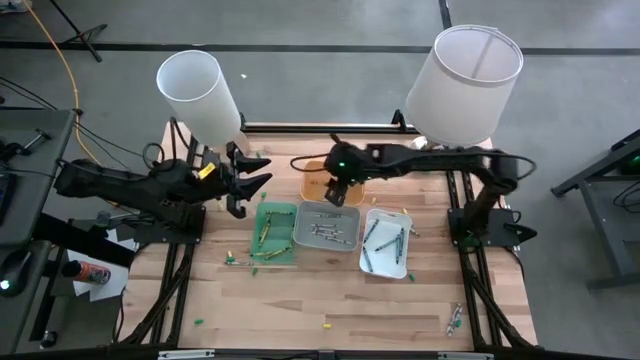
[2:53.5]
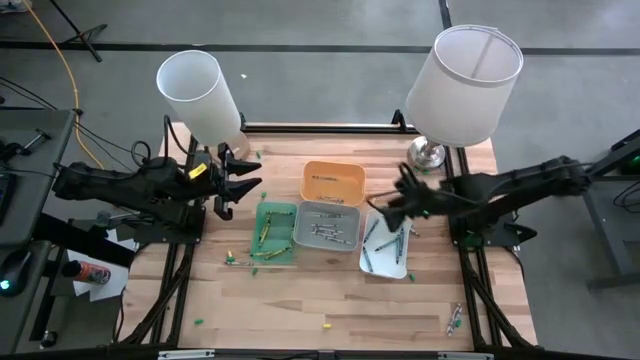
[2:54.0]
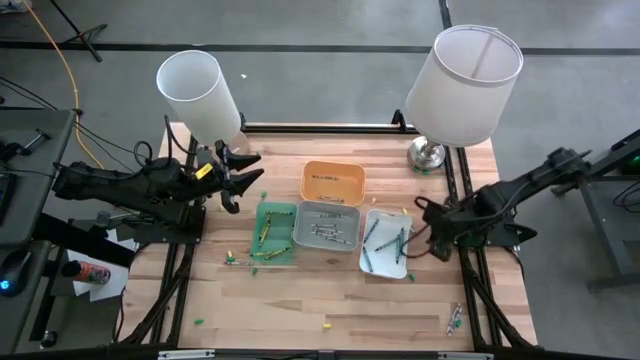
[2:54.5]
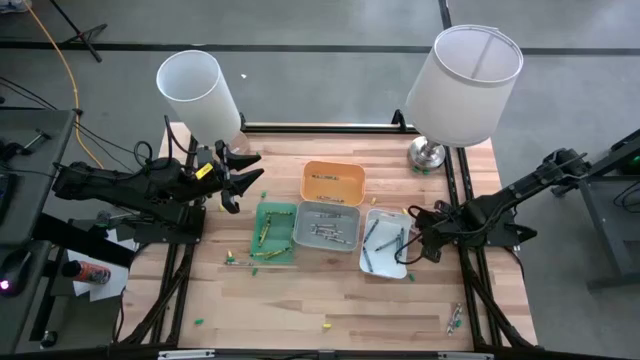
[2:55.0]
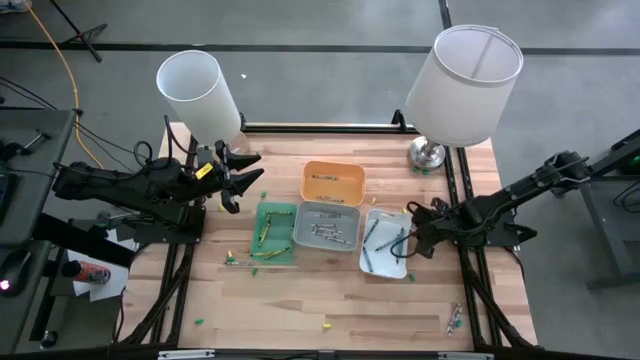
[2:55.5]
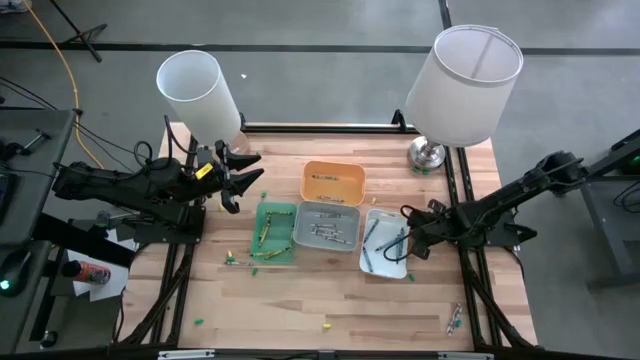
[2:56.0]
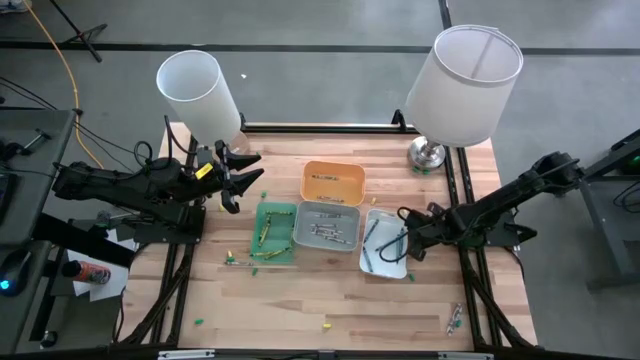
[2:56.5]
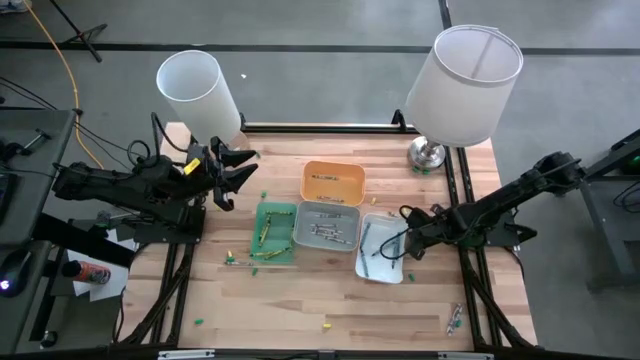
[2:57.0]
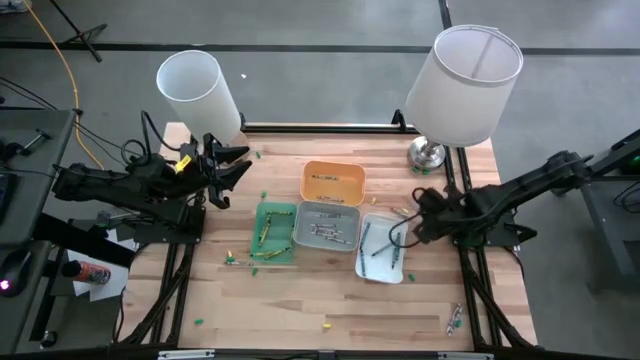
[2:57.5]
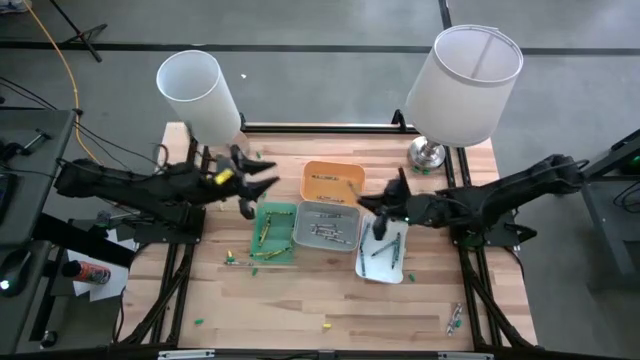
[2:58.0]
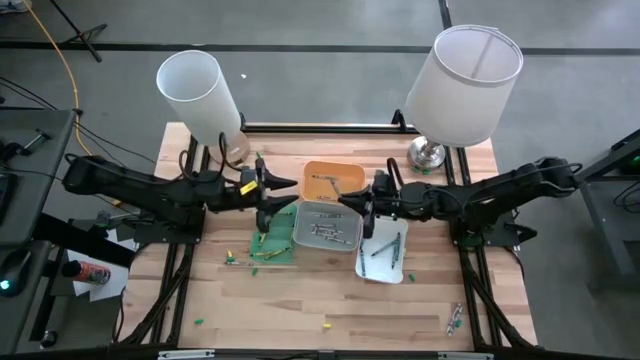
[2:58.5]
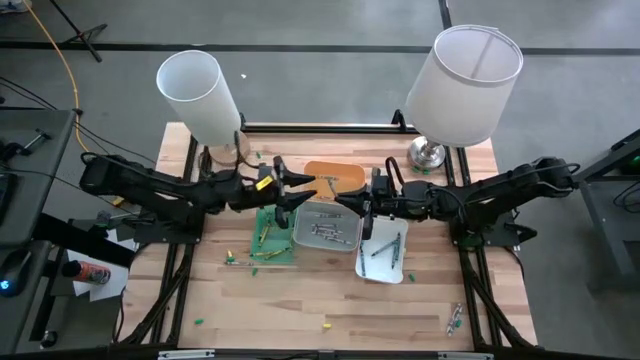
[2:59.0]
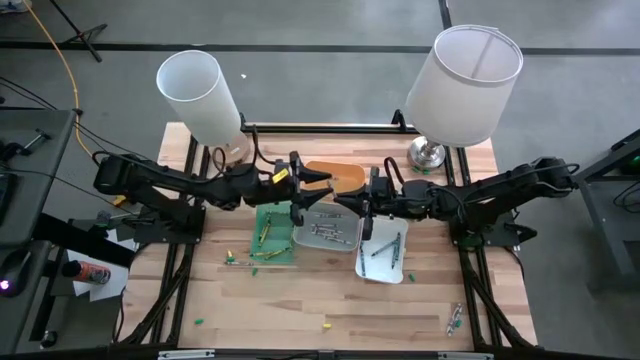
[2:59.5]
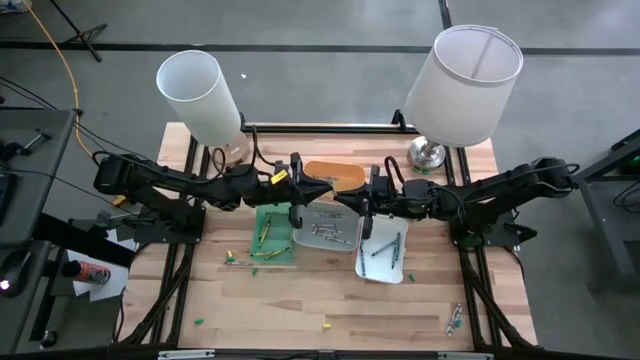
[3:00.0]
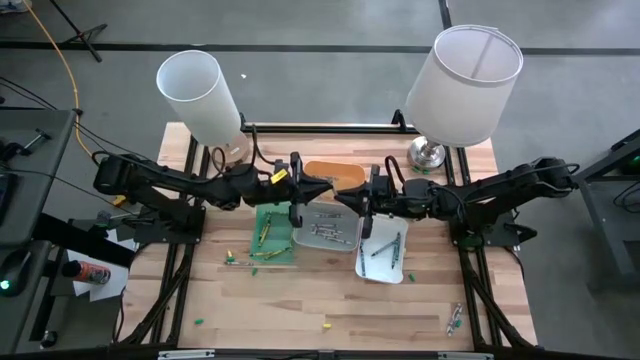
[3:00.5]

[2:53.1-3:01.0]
Task: Sort crayons
Put the gray crayon into the yellow bin

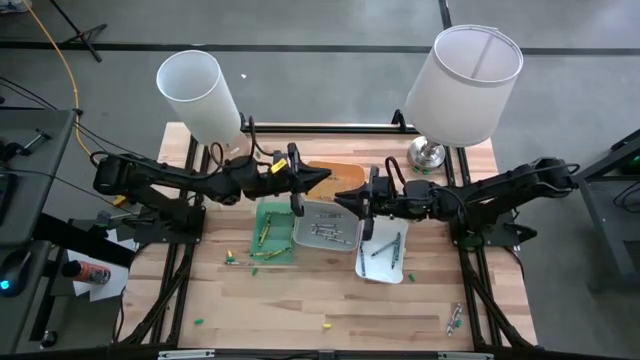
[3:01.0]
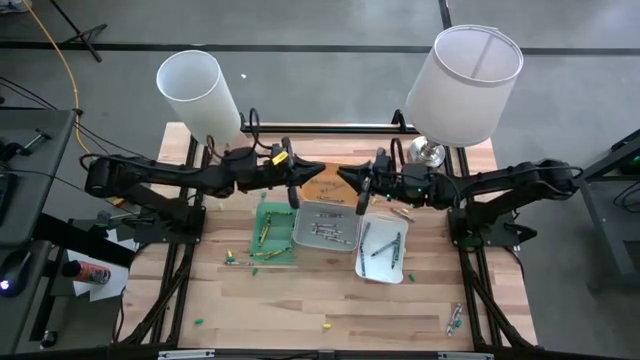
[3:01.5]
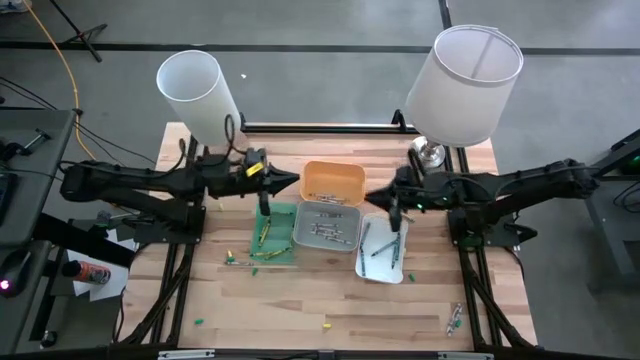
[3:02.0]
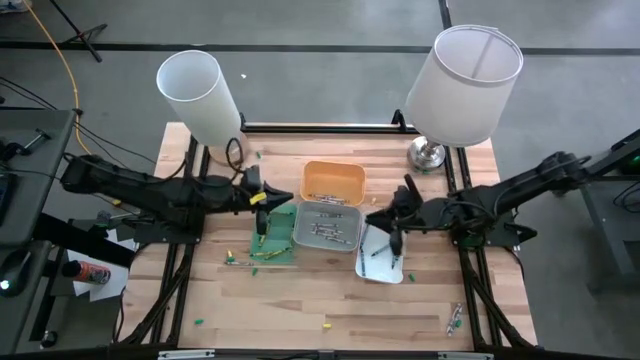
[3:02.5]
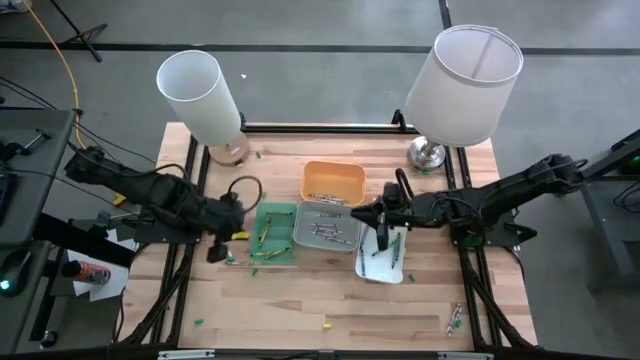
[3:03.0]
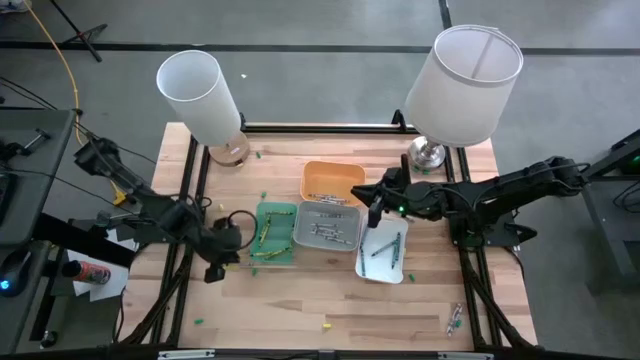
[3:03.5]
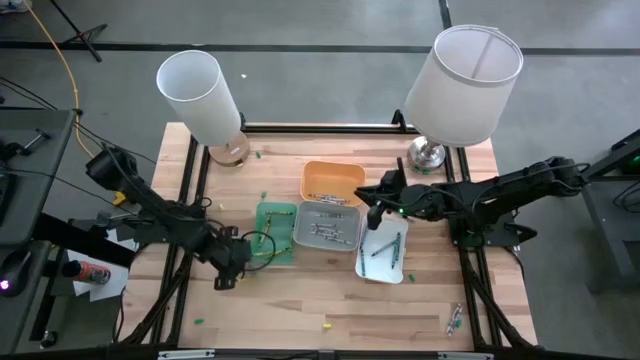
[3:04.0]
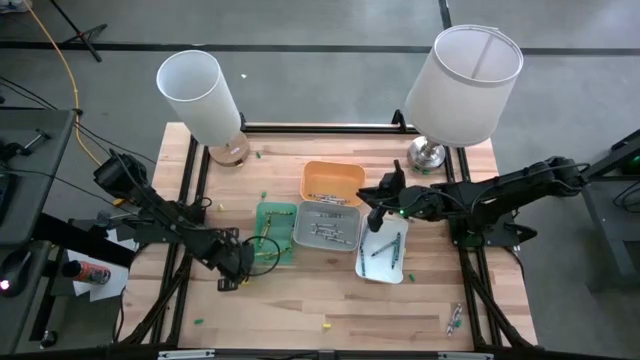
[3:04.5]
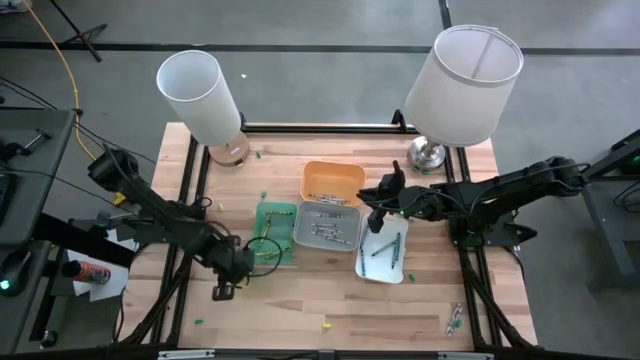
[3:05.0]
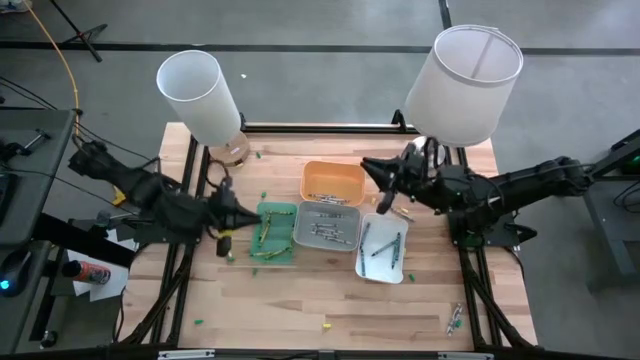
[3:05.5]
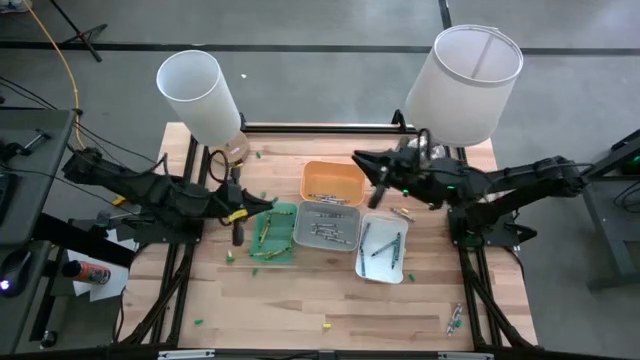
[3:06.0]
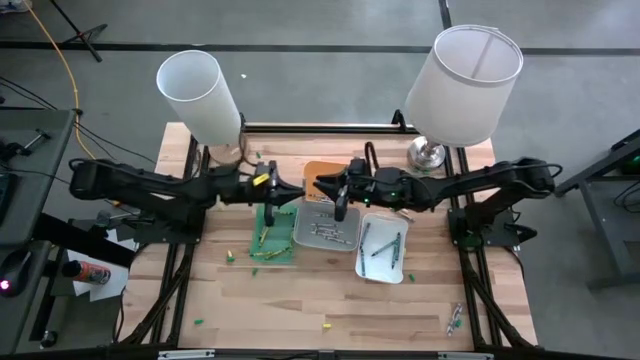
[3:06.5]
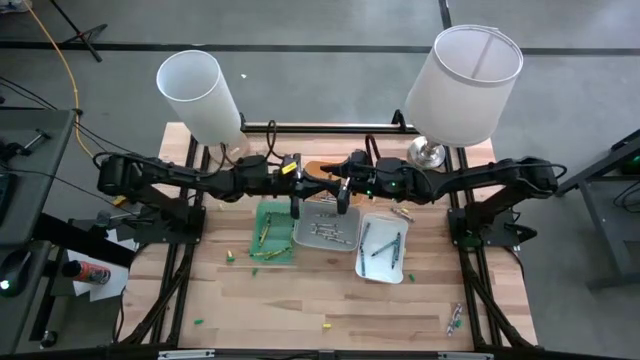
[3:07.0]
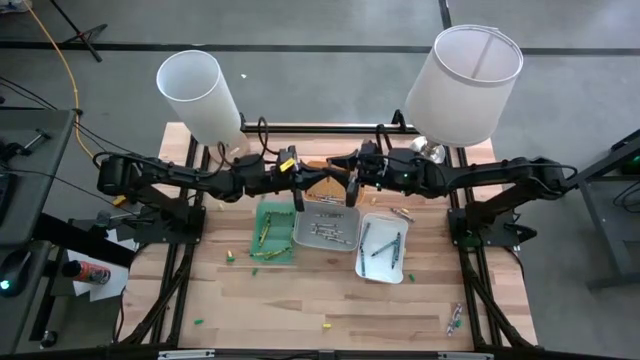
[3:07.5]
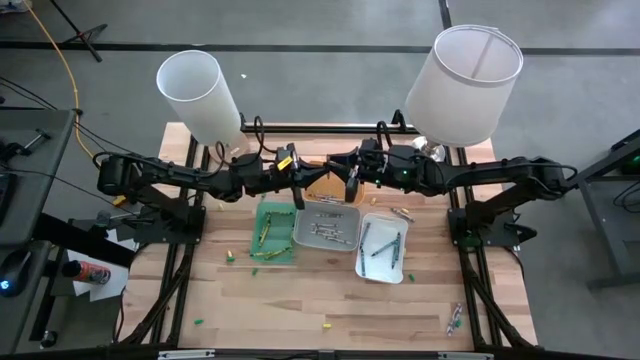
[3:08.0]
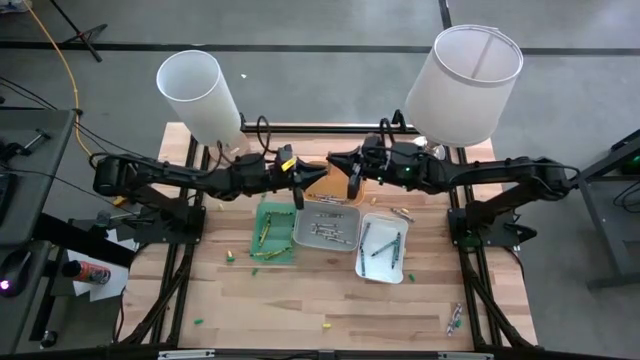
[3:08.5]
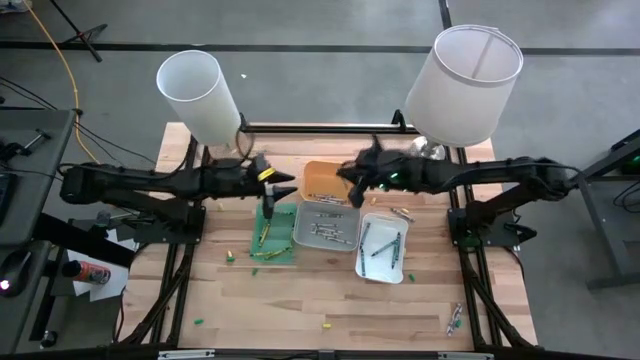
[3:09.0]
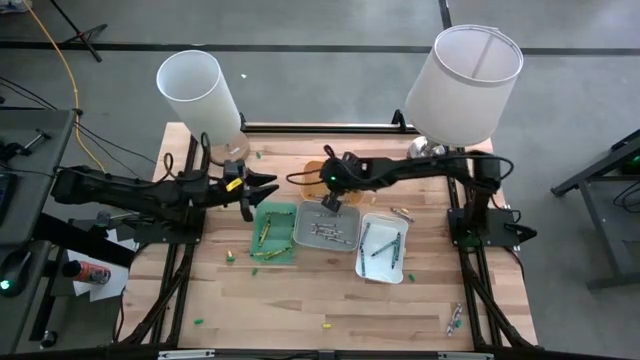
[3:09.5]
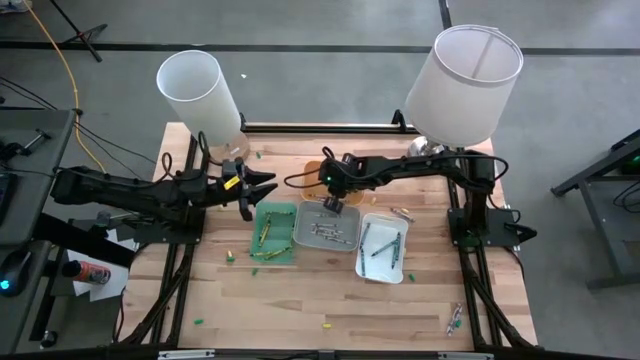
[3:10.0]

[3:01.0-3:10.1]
Put the gray crayon into the yellow bin

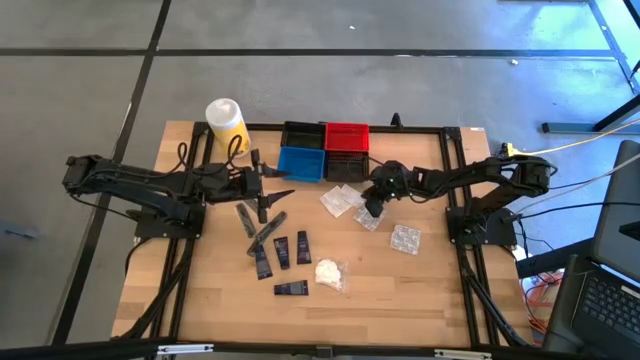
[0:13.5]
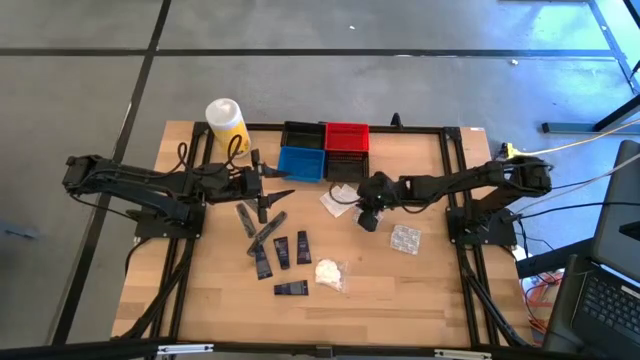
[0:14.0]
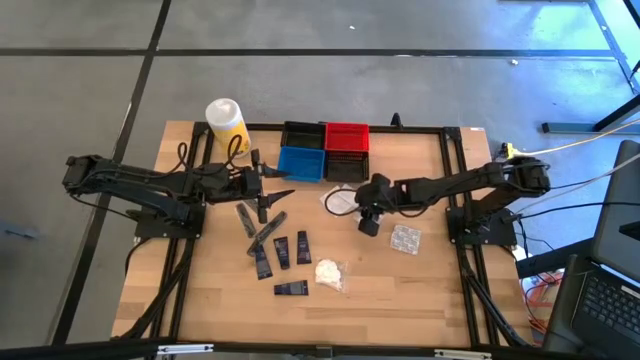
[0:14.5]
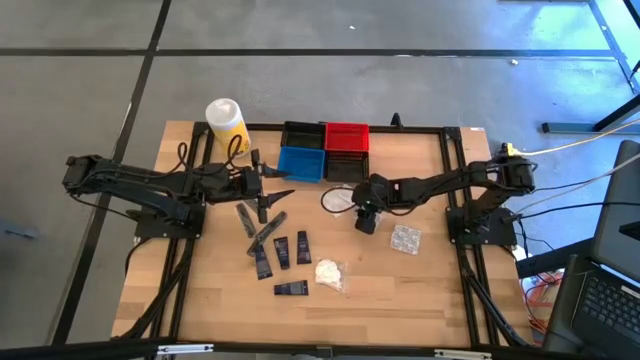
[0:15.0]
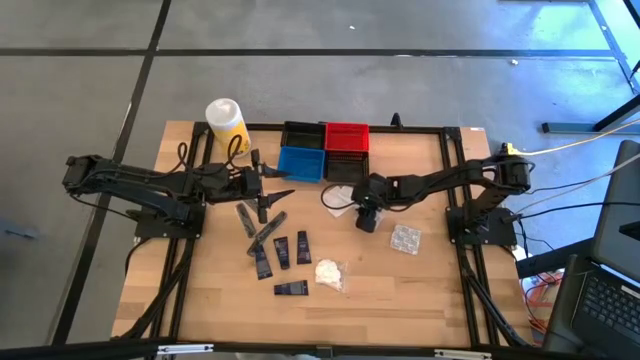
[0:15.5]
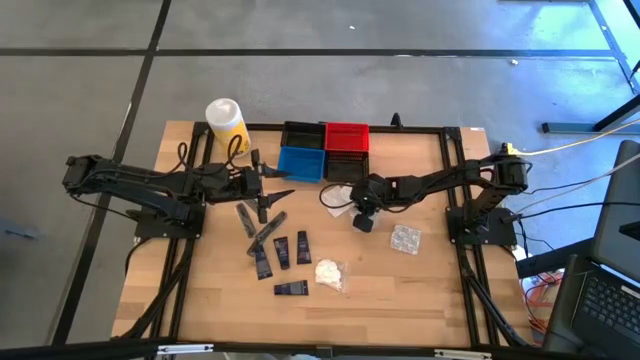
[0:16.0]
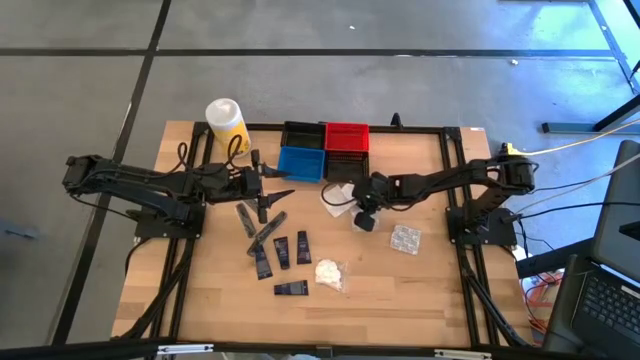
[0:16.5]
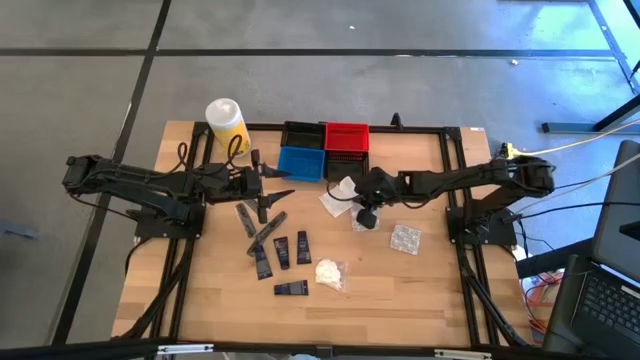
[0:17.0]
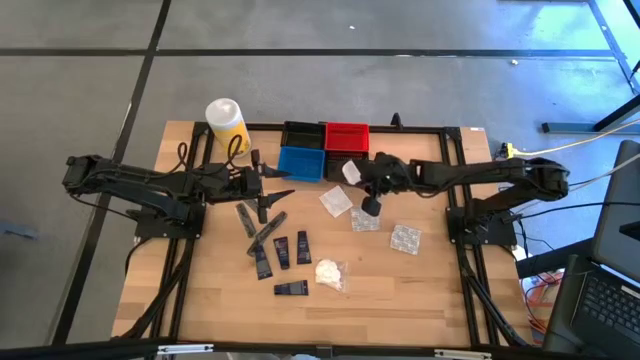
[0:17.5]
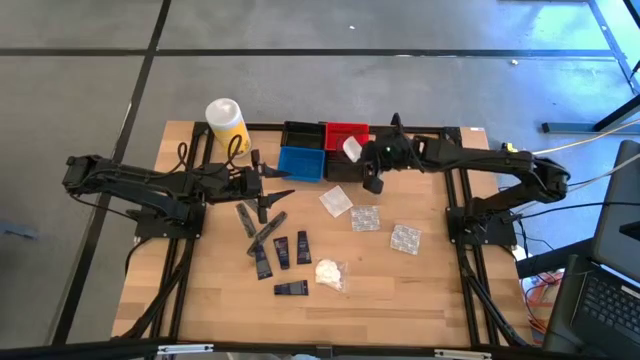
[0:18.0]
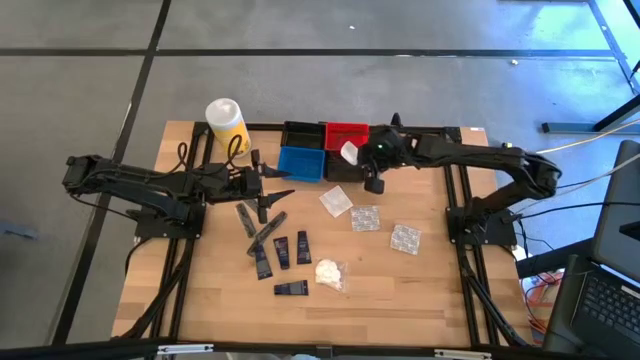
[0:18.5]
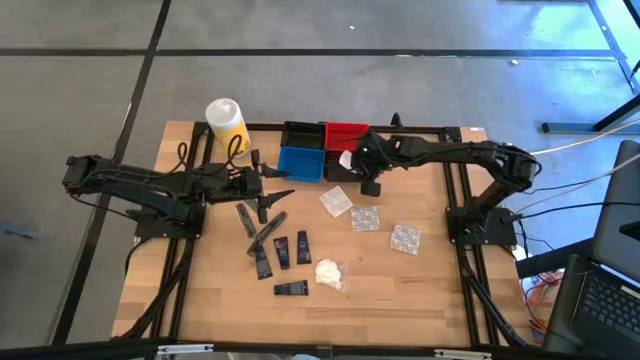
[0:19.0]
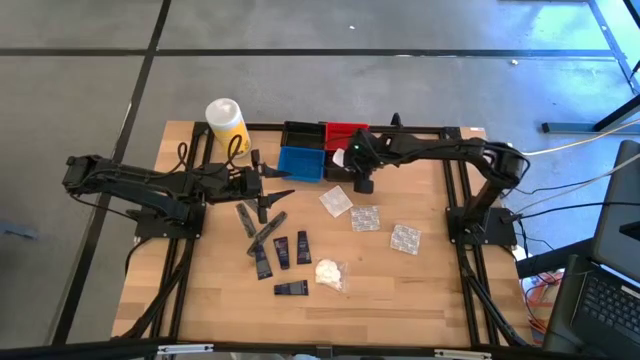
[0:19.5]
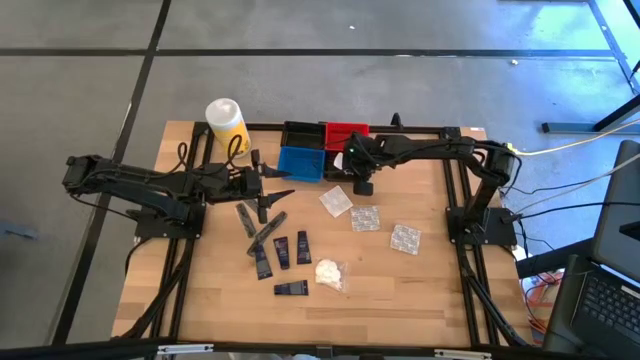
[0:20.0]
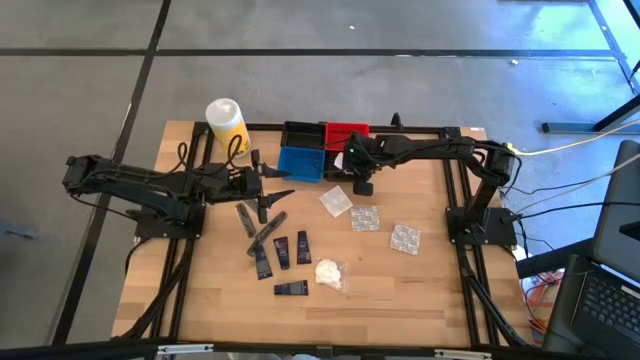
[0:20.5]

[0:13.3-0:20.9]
Task: Pick & Place Travel size toiletries
Put the bandage pack into the bottom black bin
